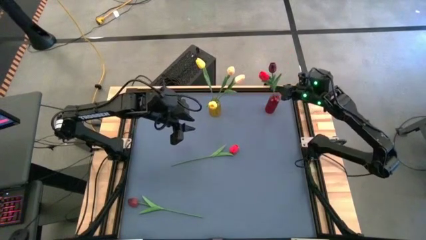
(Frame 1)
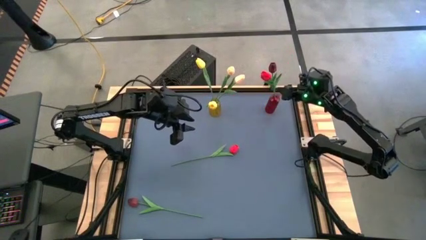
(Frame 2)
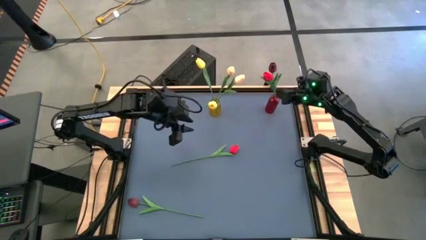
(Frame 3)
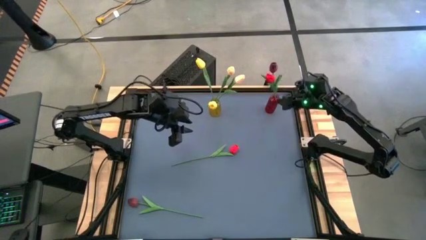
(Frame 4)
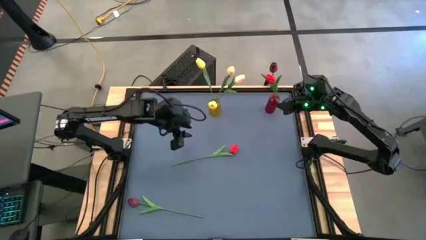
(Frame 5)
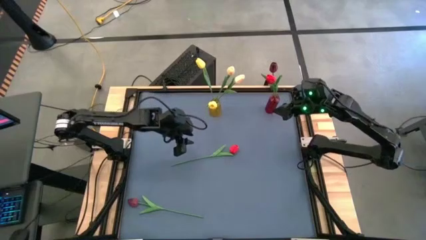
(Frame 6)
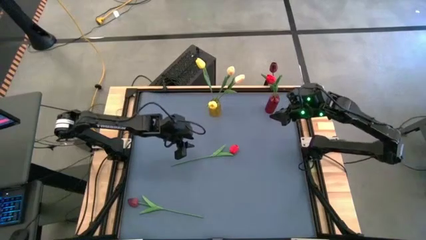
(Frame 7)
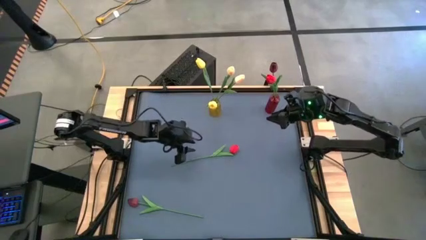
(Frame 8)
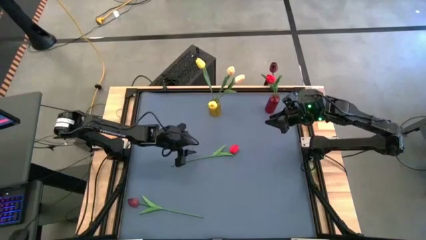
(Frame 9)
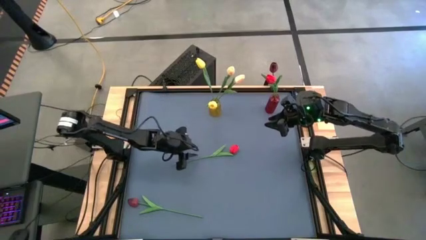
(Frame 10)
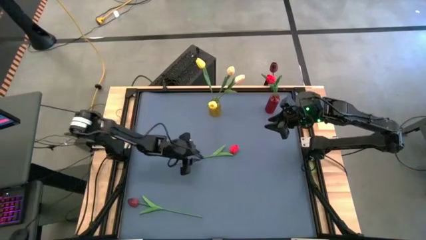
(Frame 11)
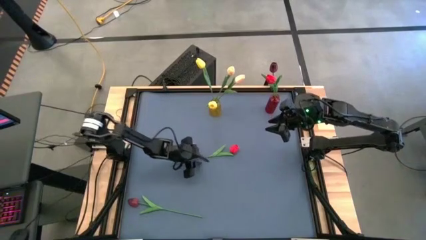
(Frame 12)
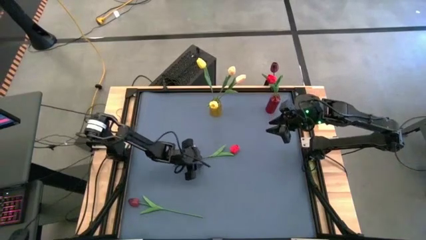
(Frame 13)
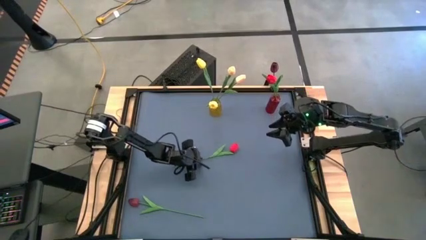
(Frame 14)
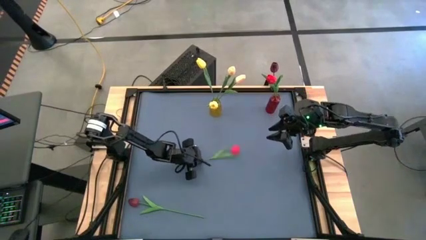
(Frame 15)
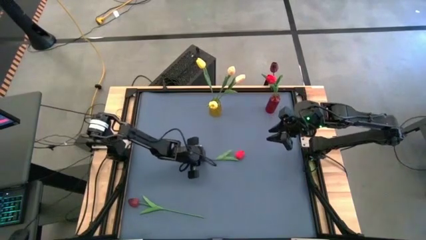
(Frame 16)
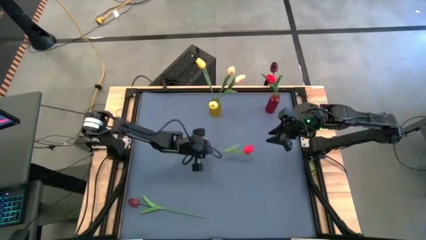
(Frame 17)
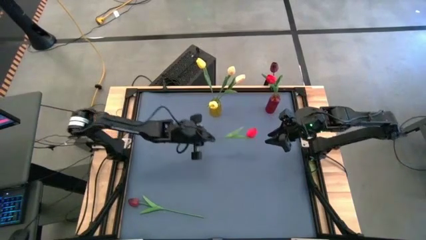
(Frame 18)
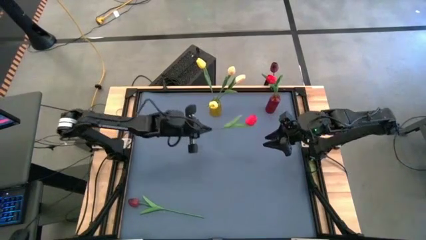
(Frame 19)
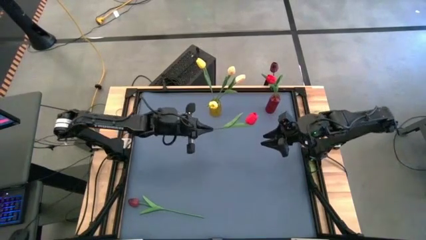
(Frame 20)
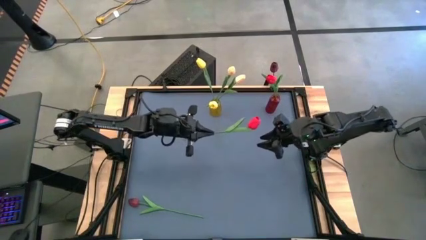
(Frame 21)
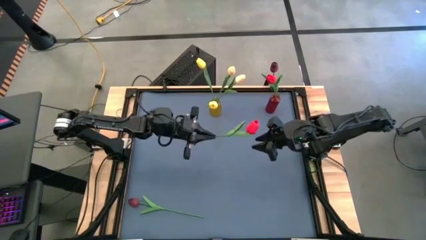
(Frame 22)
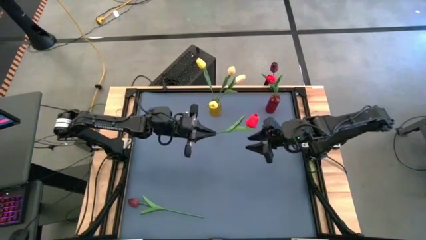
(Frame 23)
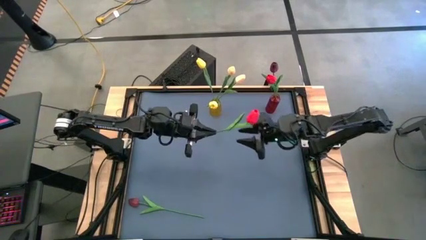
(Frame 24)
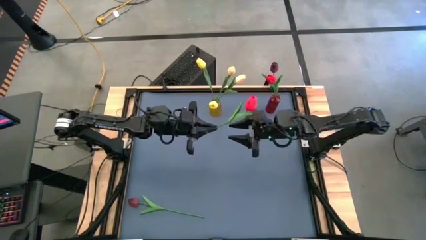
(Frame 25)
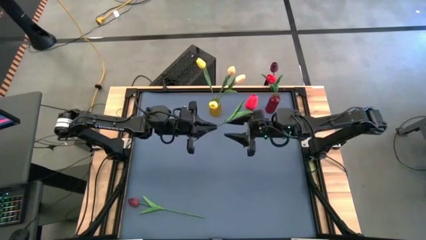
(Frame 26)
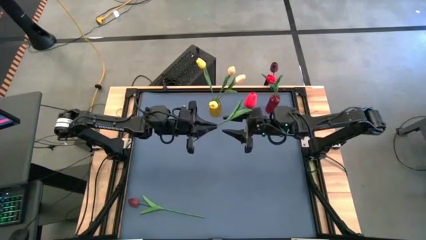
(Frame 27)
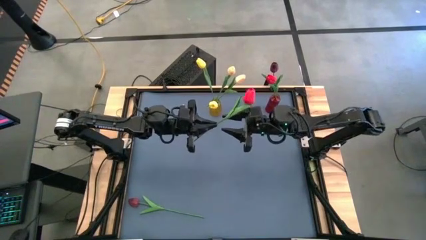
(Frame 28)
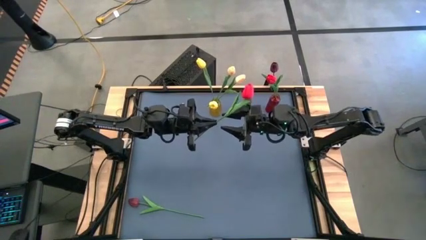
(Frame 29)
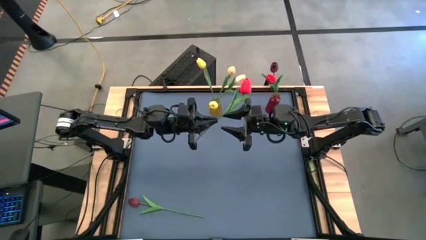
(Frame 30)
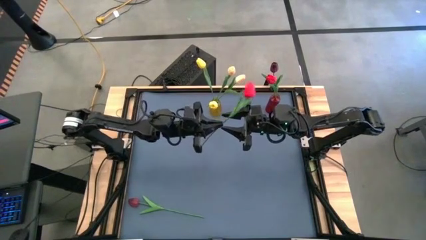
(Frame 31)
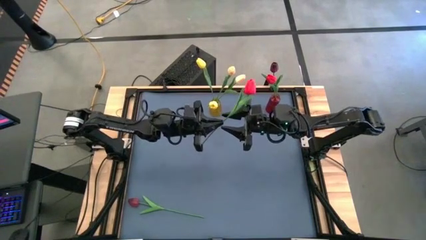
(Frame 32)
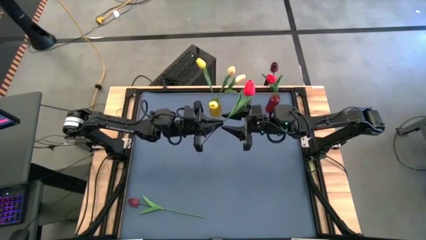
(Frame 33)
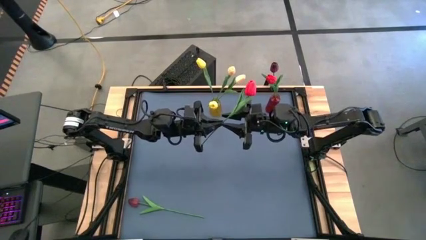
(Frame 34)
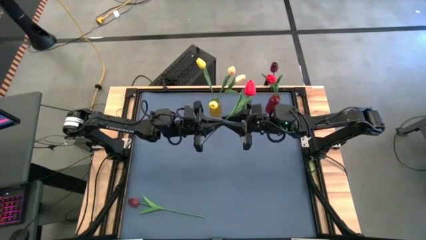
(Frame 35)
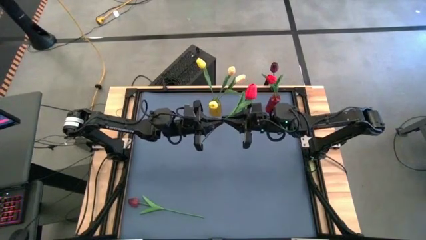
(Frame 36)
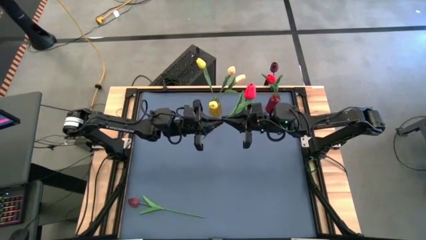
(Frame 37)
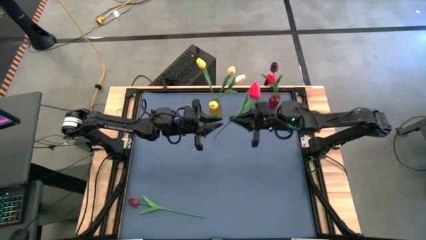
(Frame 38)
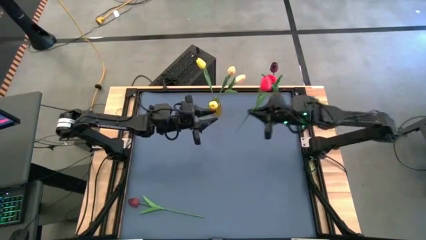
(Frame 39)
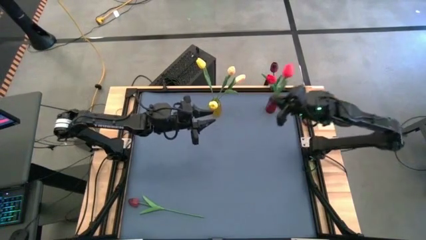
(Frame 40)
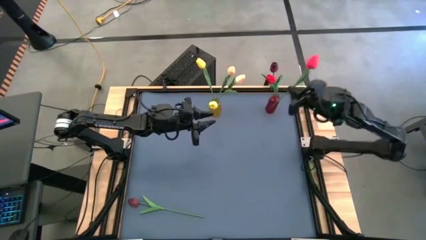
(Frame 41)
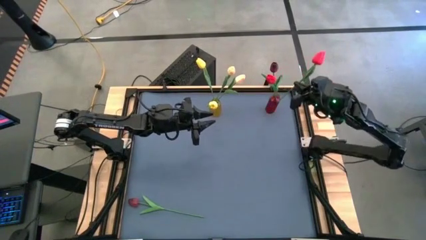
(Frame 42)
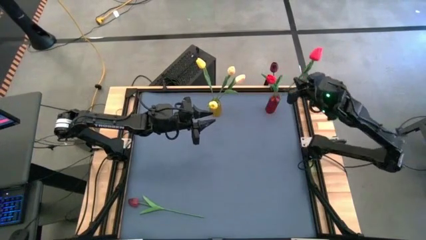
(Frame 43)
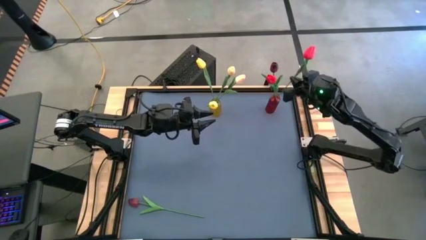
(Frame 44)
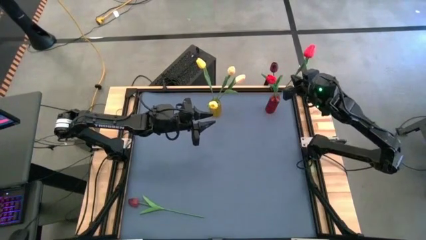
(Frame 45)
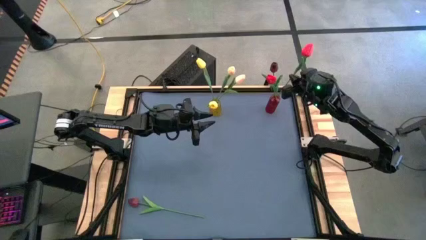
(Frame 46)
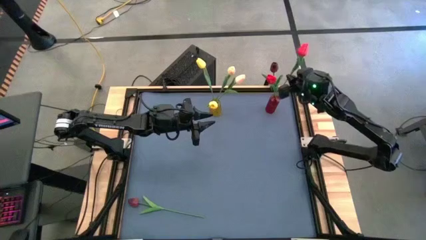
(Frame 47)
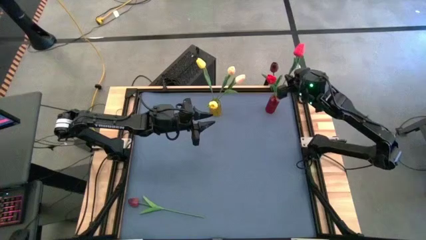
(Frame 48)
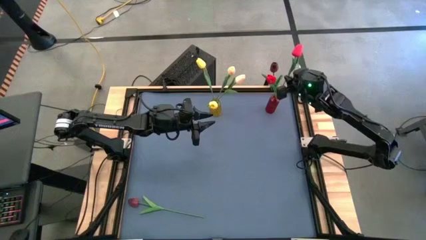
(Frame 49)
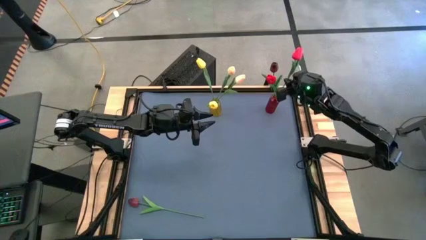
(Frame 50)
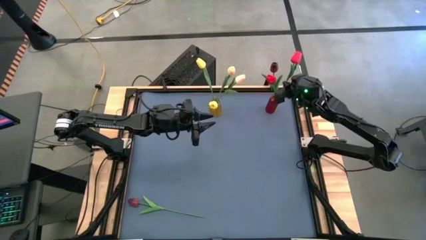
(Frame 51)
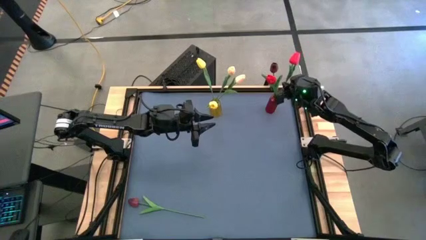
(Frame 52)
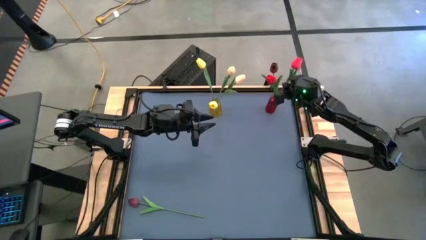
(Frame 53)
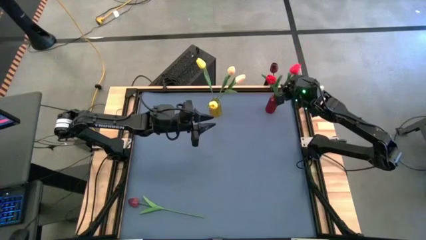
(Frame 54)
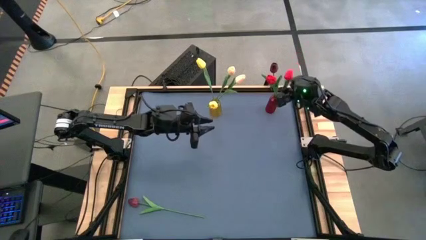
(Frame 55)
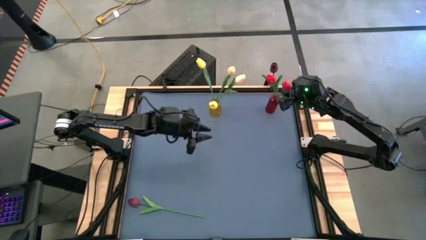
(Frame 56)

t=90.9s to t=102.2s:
Task: Sort flowers into vase by color
Put the red flower into the red vase

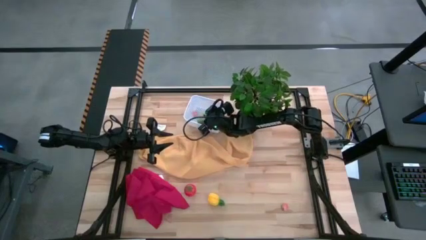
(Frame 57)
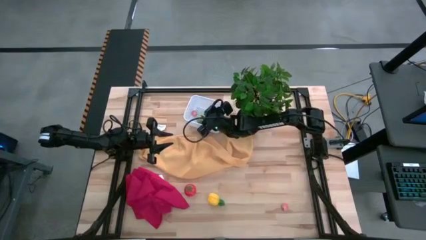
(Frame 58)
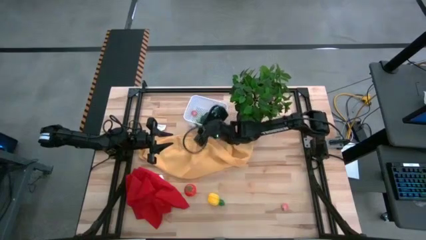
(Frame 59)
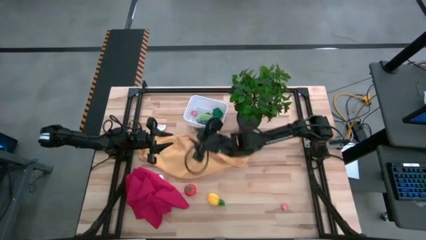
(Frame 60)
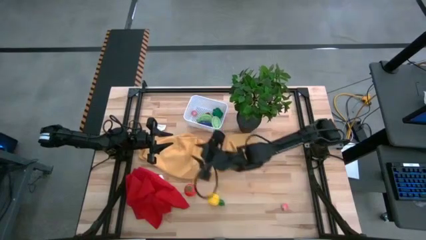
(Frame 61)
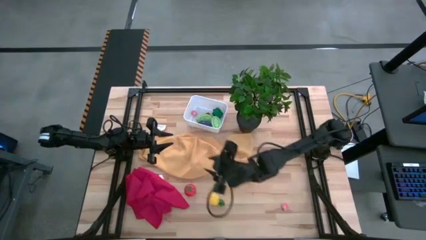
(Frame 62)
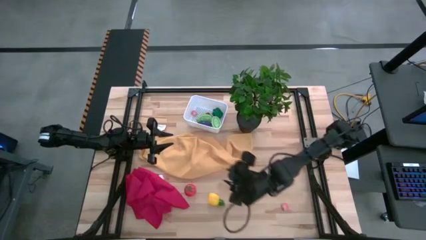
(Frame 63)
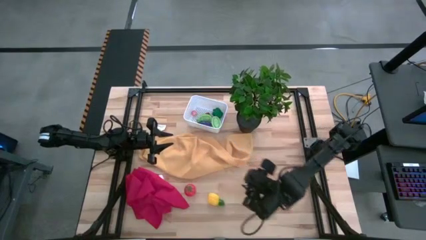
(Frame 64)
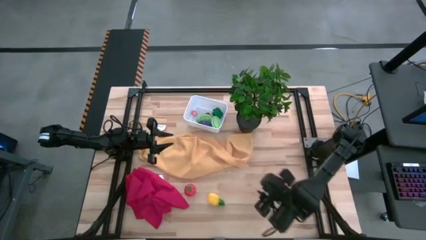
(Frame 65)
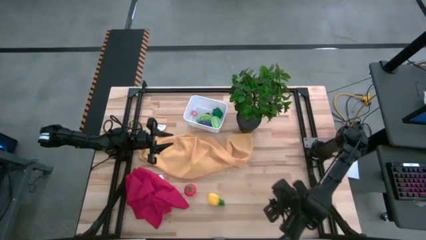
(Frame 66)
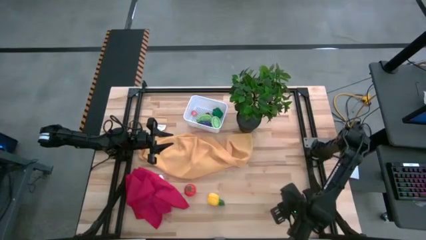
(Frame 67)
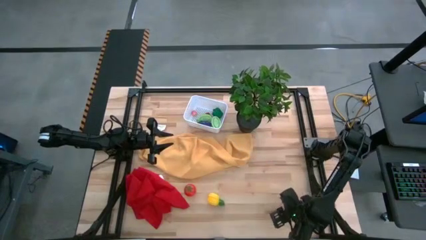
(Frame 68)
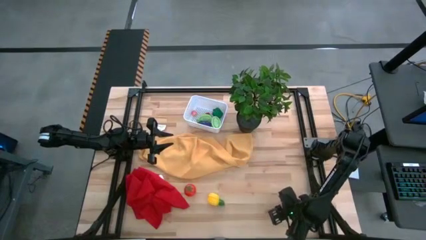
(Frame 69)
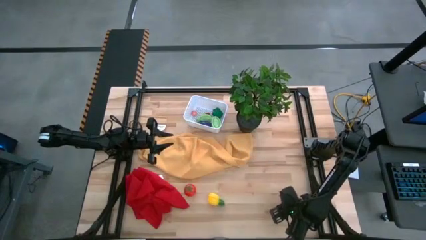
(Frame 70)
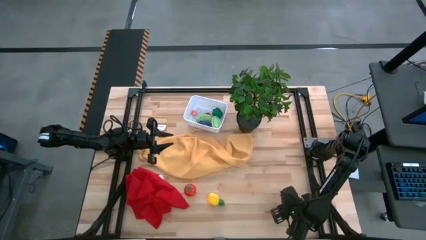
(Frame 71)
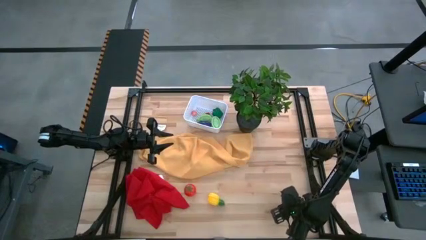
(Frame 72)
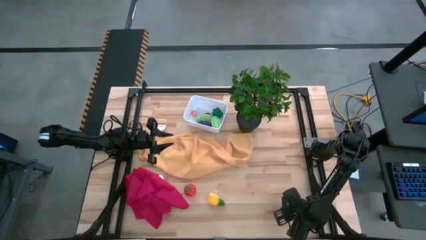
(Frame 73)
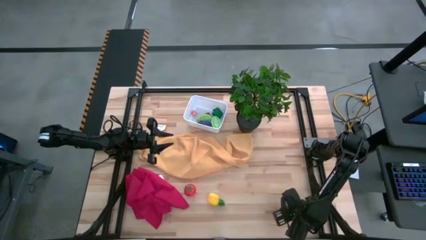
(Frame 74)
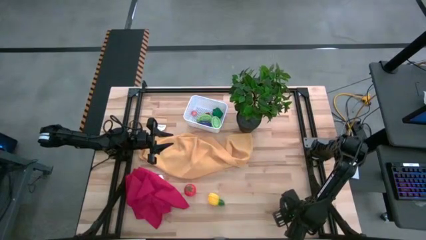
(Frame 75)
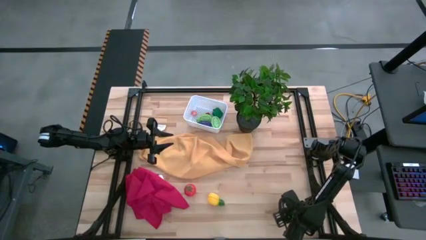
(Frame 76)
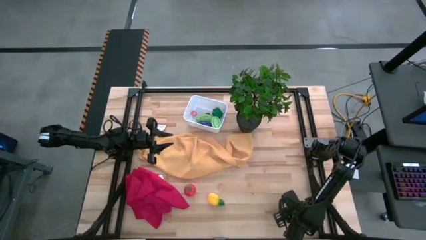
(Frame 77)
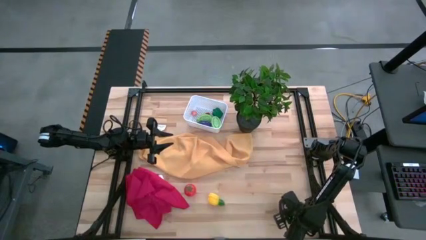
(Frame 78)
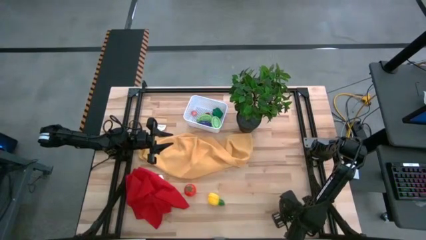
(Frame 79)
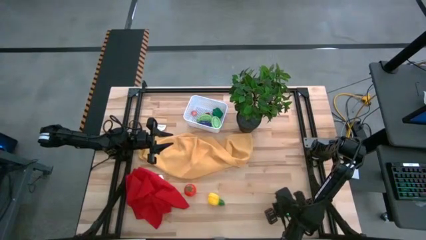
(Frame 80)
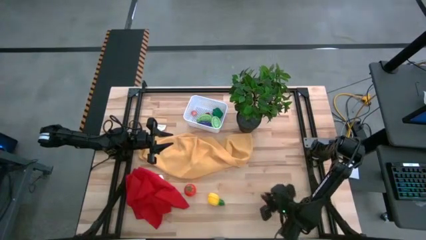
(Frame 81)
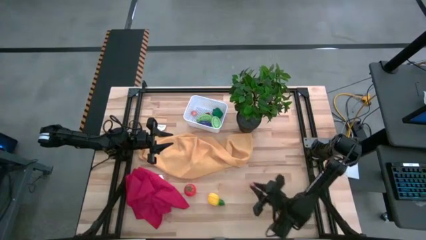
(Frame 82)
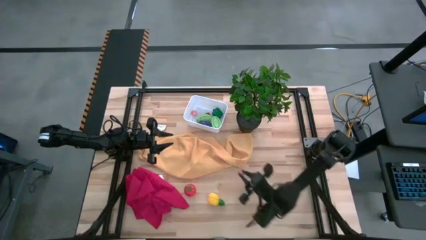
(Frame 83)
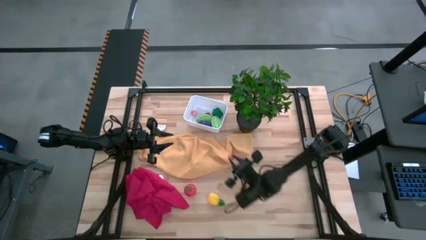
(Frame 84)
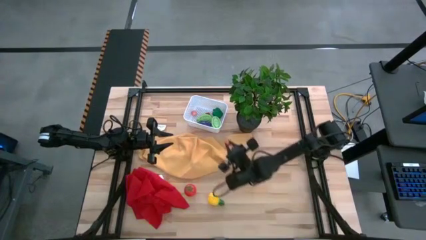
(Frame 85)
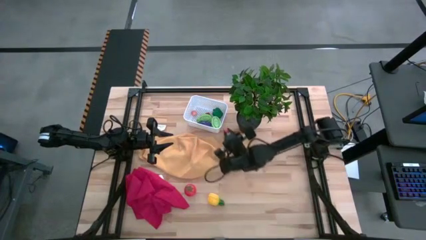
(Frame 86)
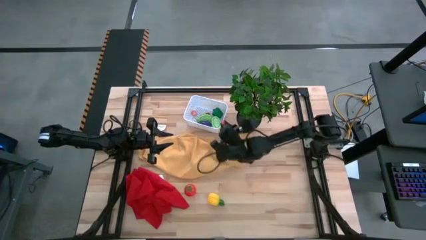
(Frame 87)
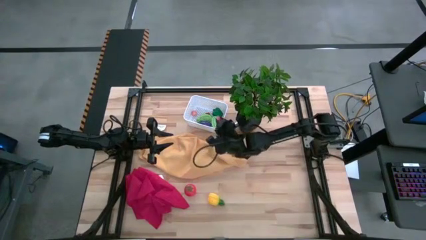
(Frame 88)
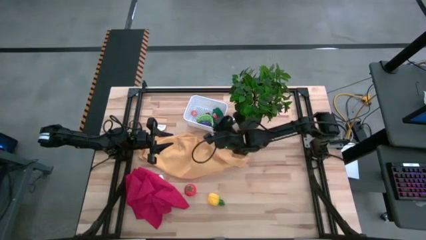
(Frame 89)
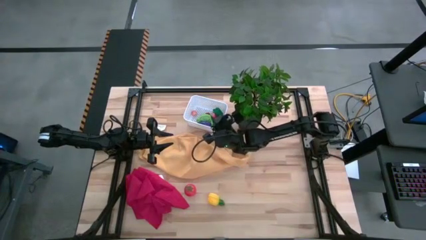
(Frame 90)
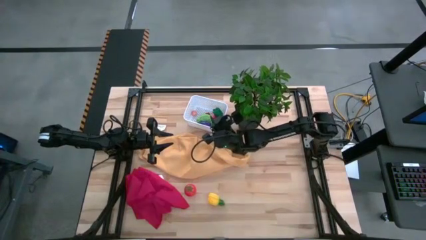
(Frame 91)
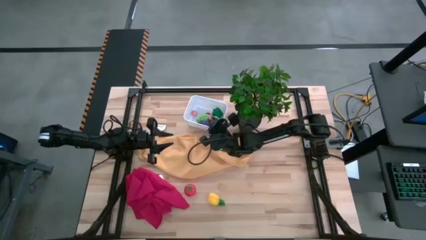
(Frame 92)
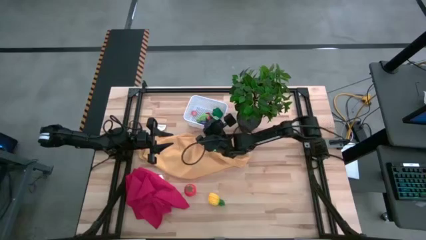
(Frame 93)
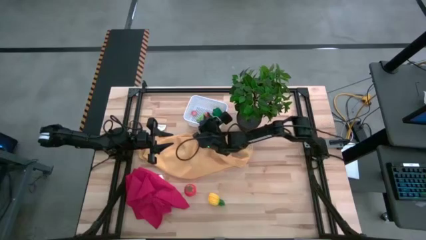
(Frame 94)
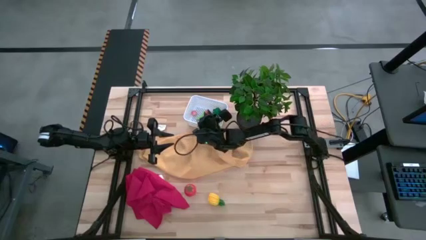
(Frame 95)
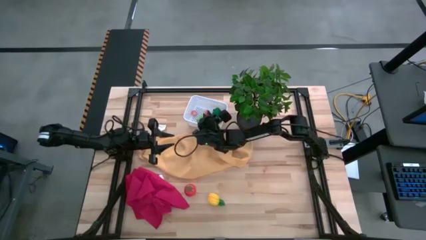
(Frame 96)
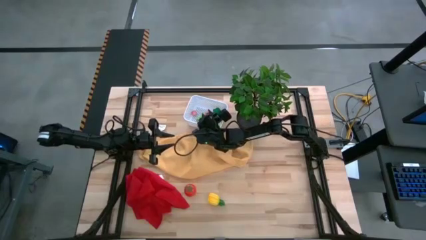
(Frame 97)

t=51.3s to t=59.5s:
Task: Pick and placing Produce into tupperware
Put the pink peach into the white bin
